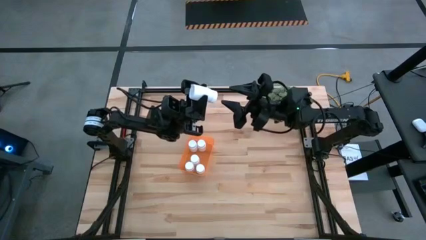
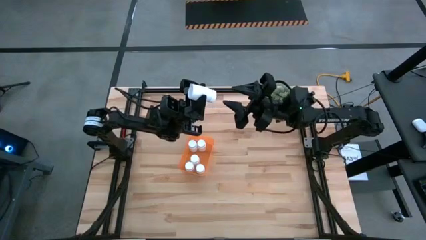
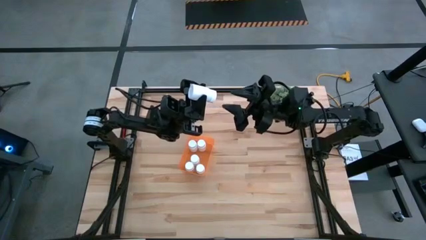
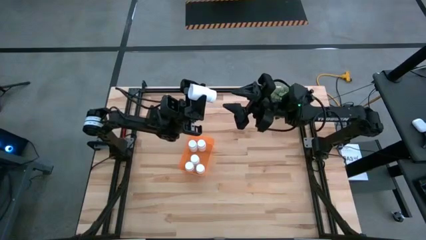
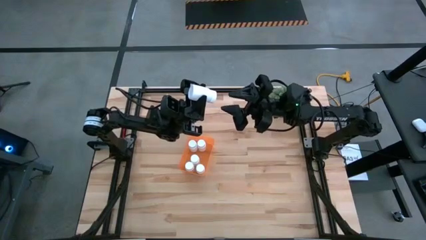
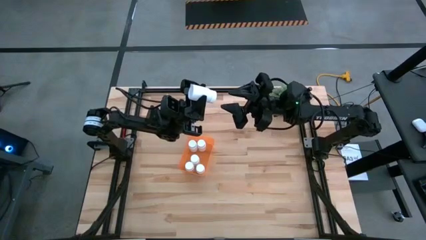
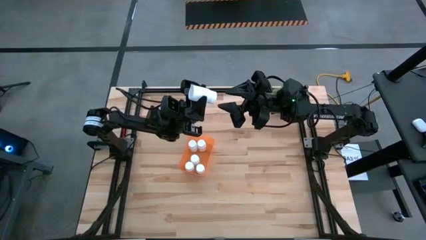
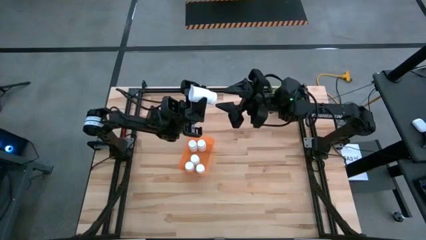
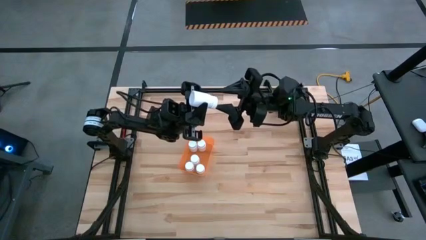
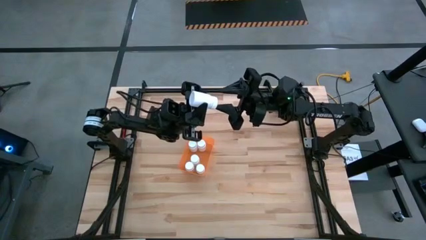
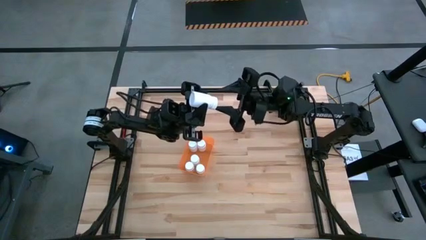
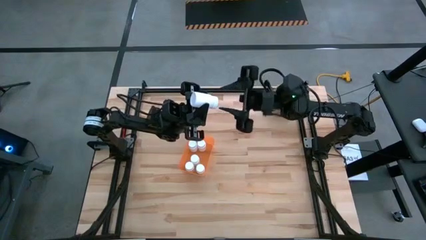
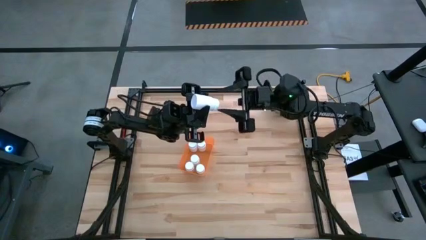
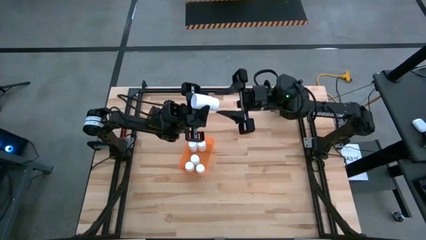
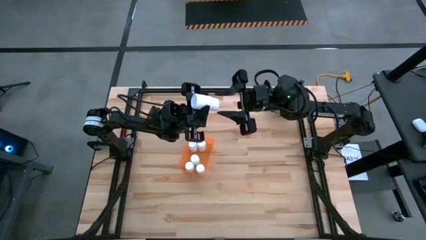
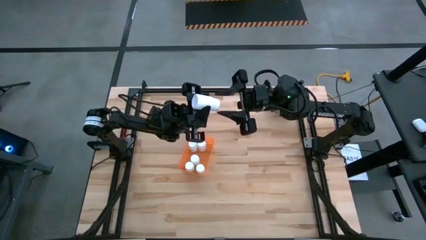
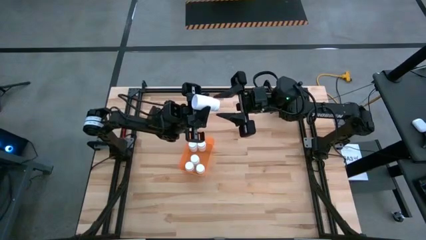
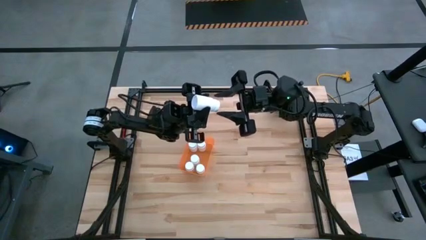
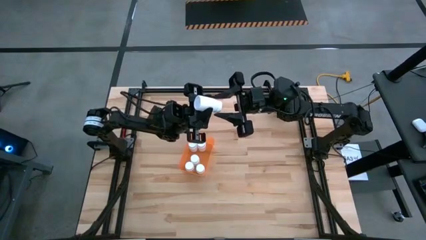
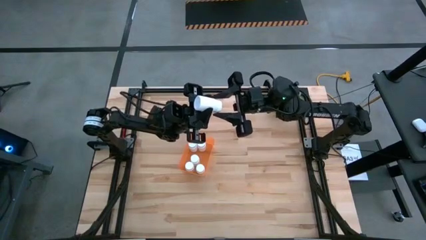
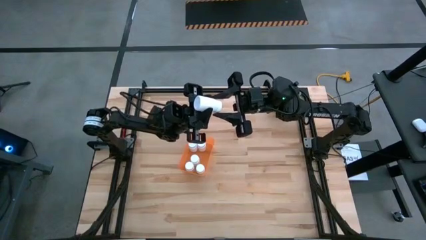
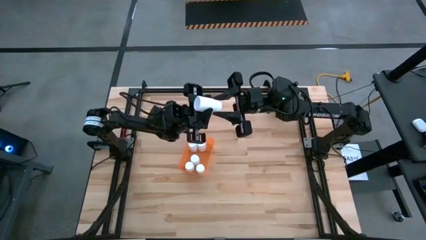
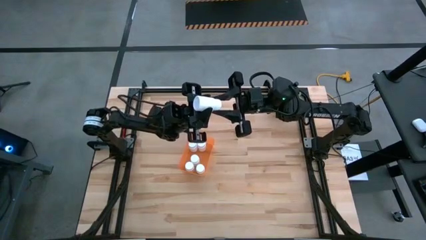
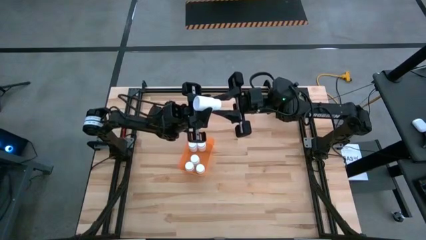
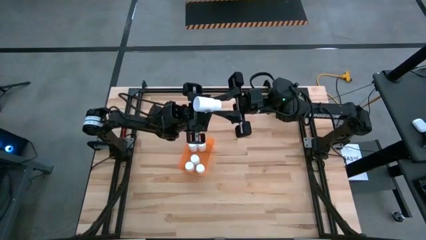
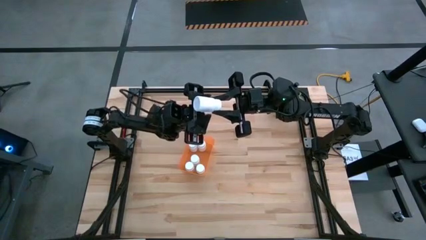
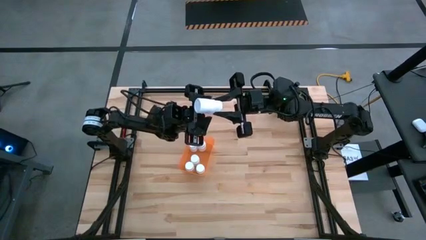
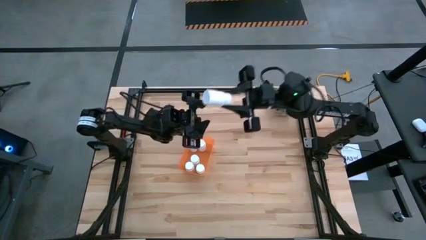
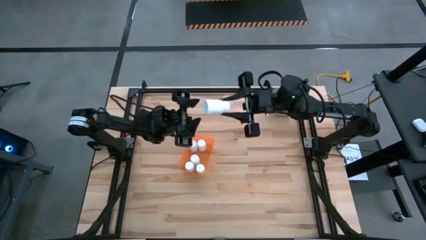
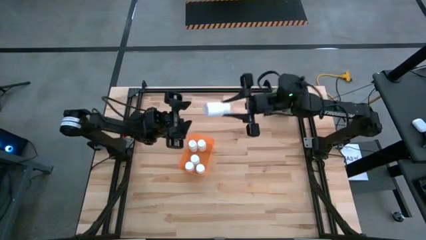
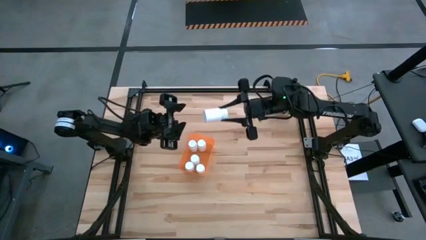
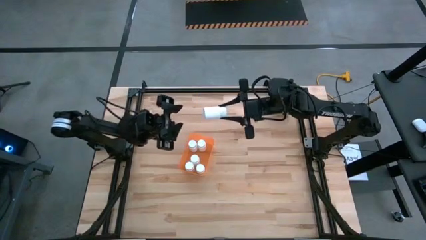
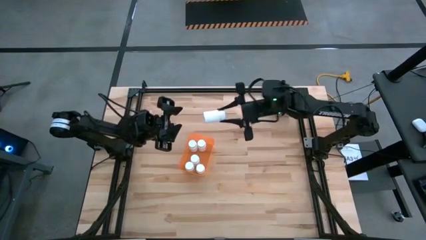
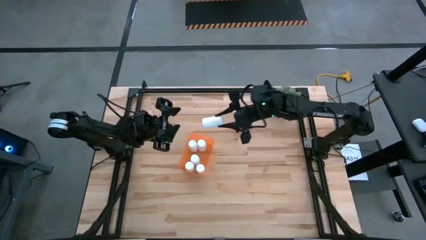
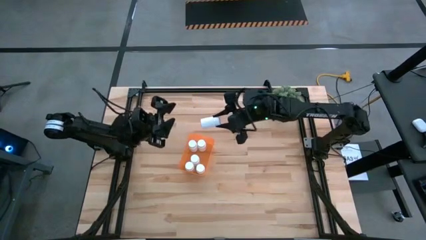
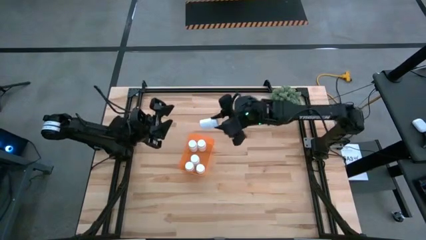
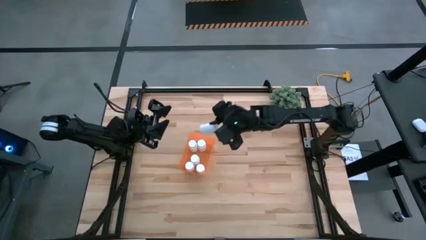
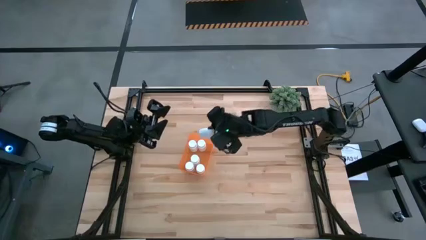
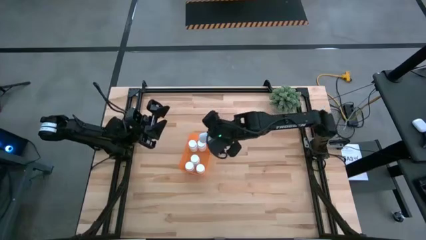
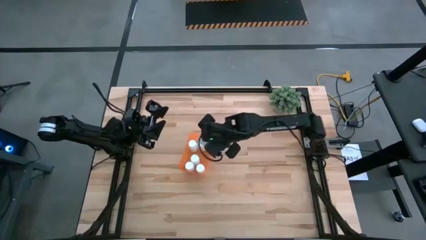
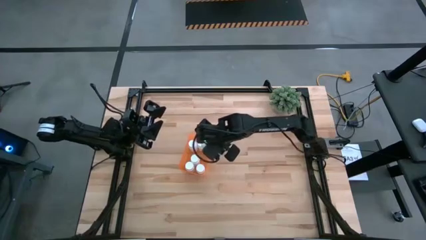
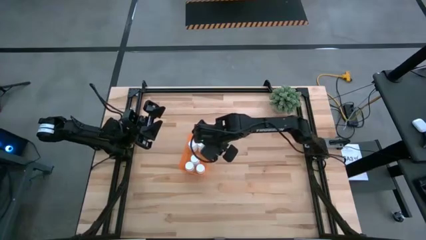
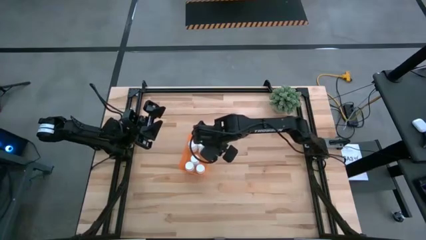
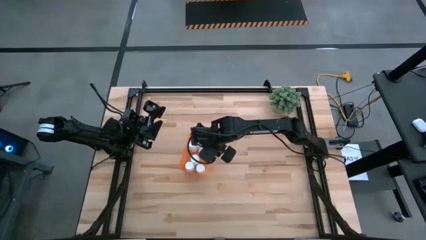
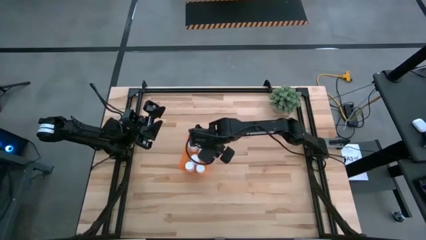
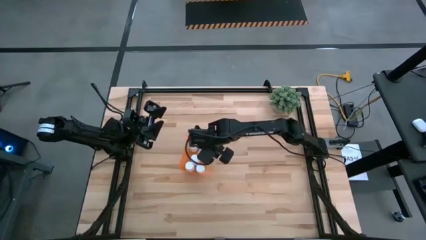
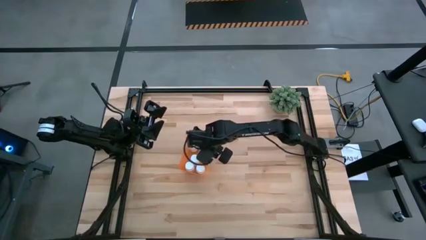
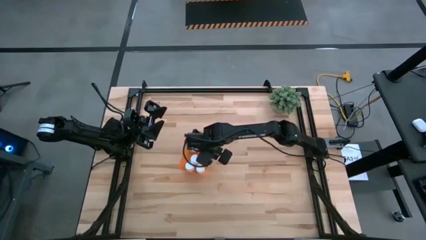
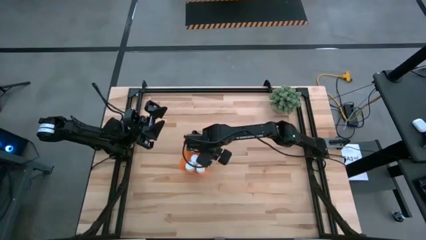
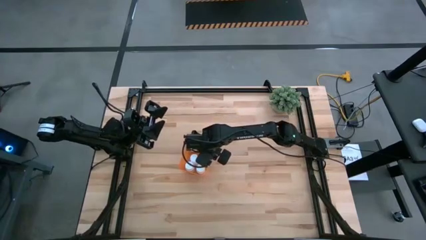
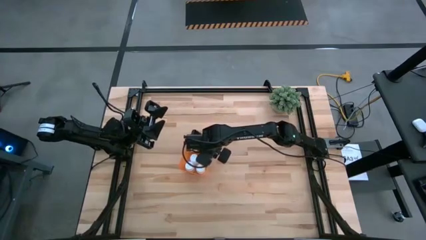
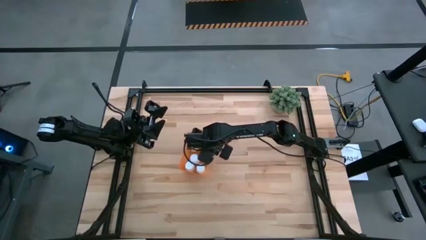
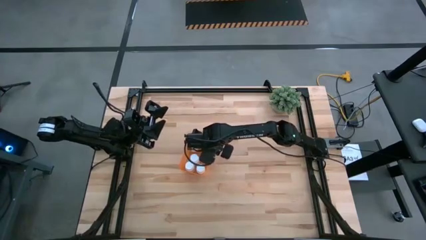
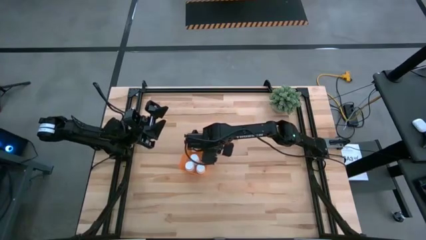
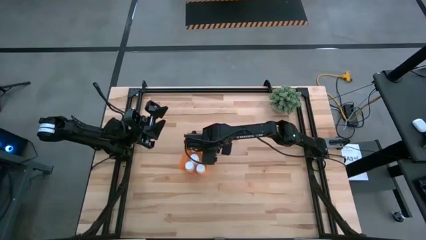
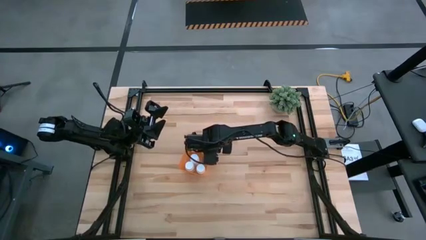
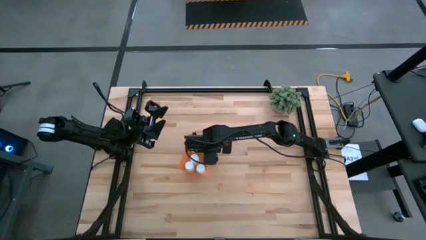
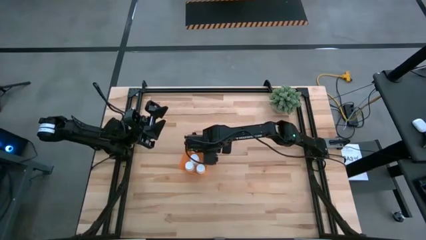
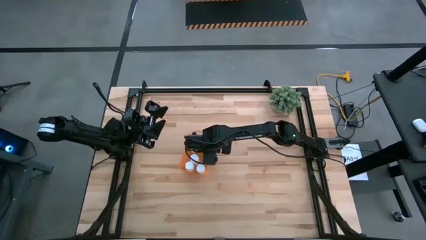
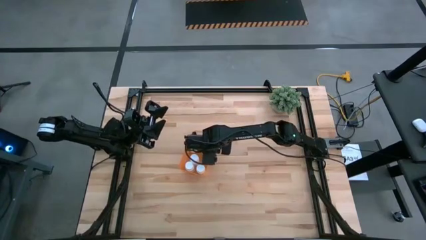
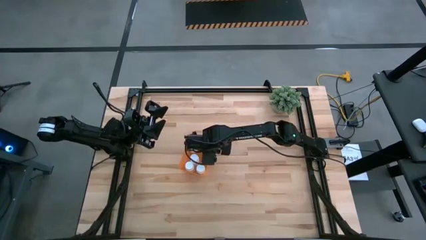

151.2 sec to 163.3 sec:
Task: Pick and place pill bottles into a basket
Put the white medicine bottle into the orange bin
